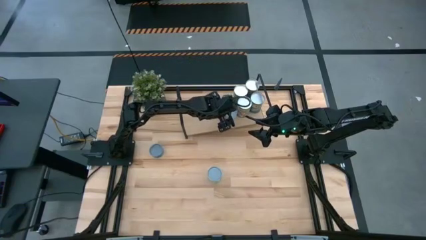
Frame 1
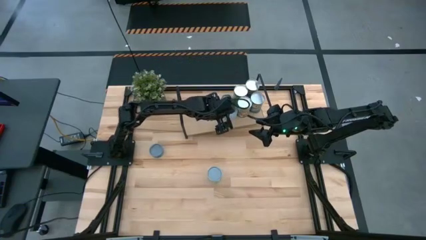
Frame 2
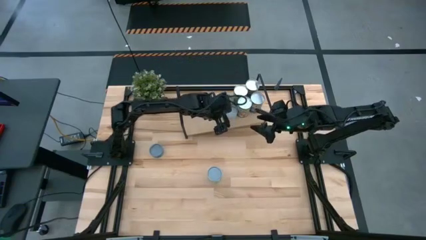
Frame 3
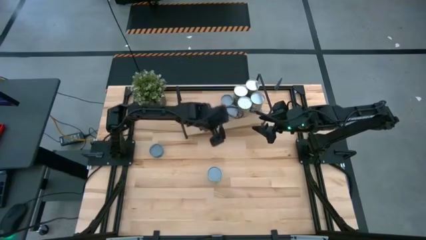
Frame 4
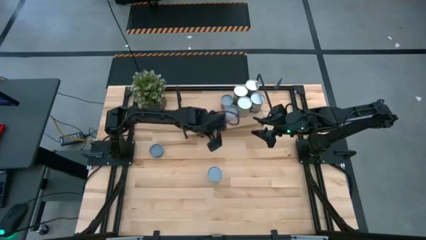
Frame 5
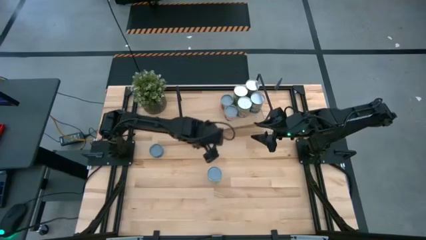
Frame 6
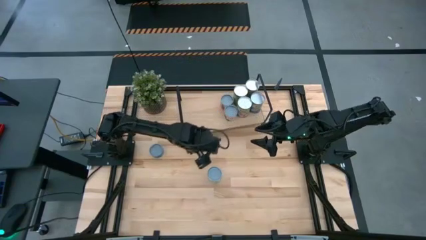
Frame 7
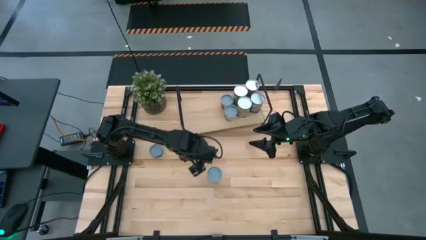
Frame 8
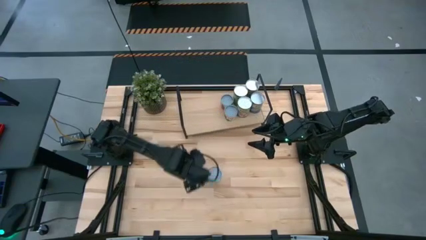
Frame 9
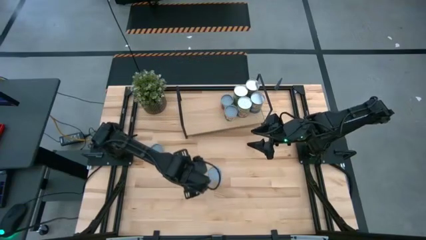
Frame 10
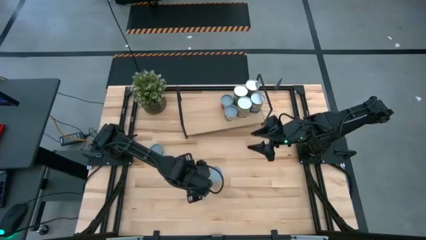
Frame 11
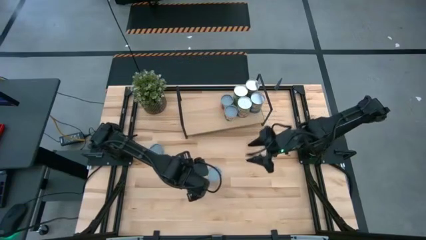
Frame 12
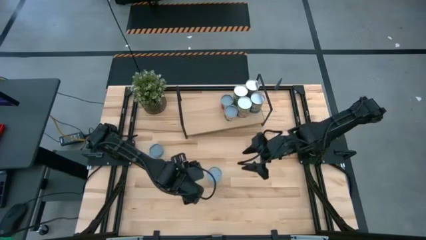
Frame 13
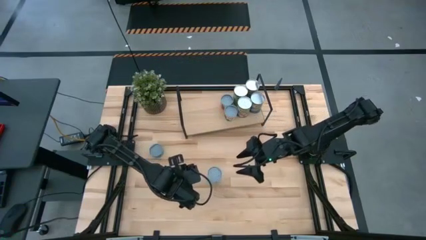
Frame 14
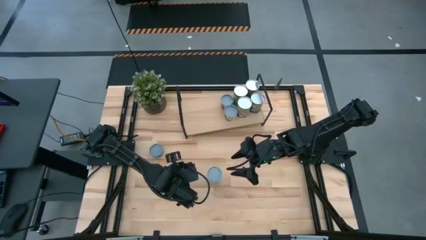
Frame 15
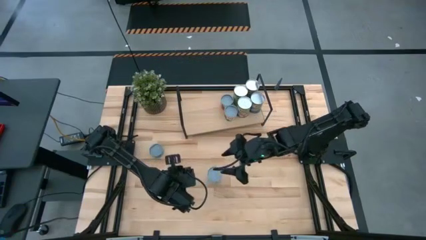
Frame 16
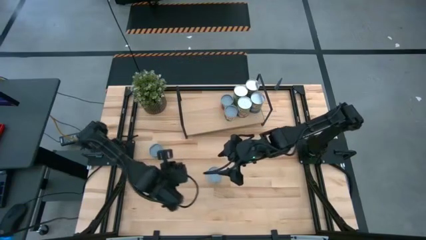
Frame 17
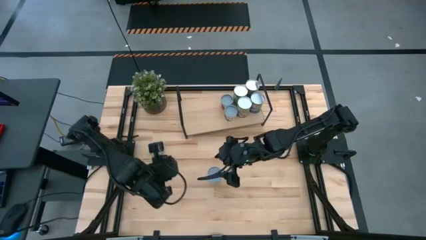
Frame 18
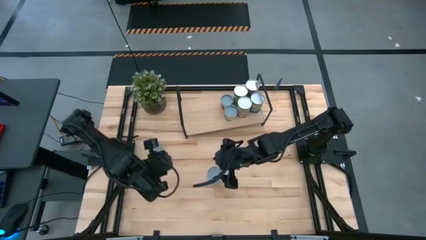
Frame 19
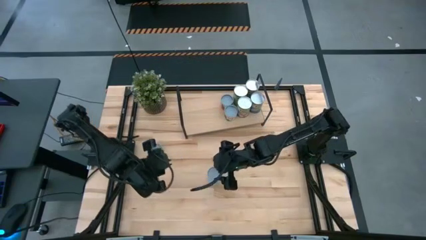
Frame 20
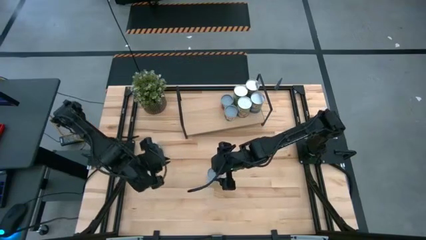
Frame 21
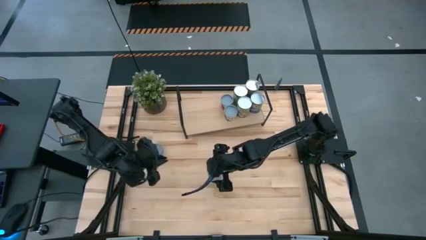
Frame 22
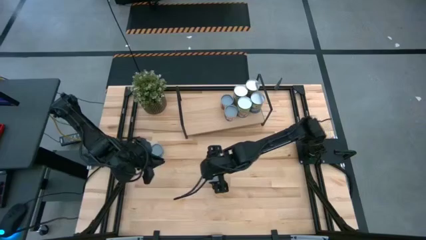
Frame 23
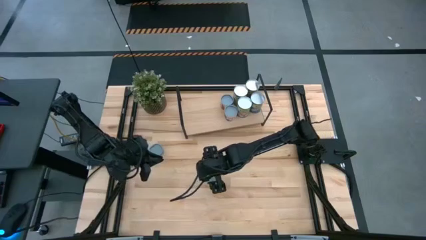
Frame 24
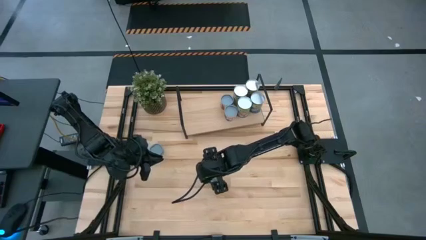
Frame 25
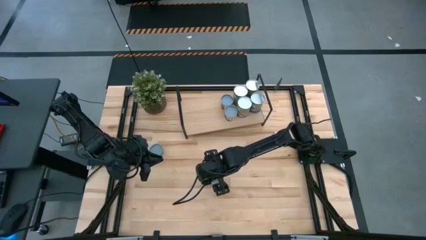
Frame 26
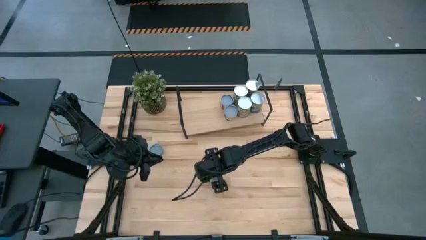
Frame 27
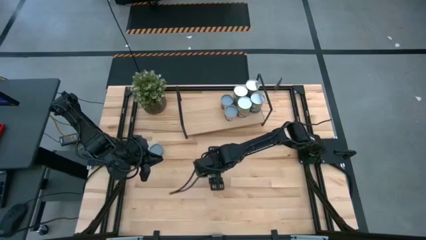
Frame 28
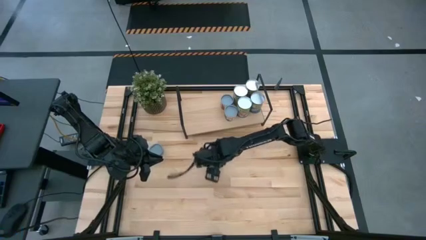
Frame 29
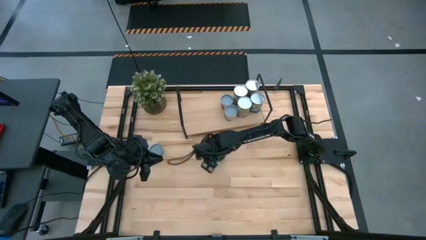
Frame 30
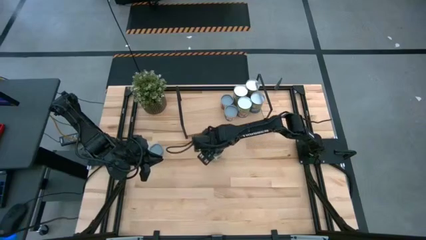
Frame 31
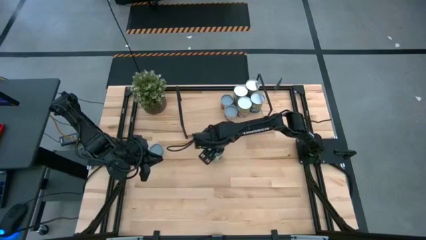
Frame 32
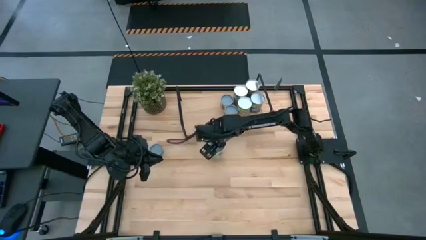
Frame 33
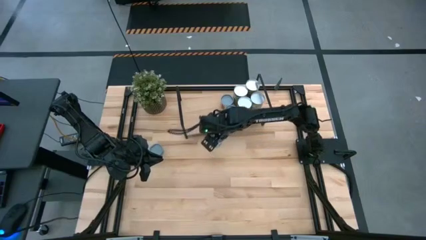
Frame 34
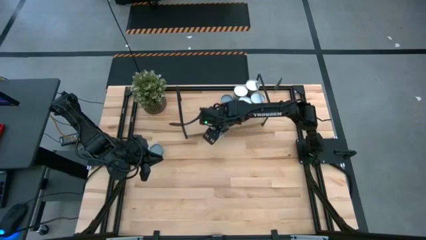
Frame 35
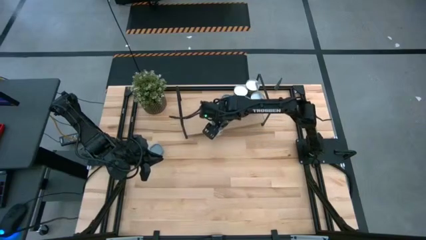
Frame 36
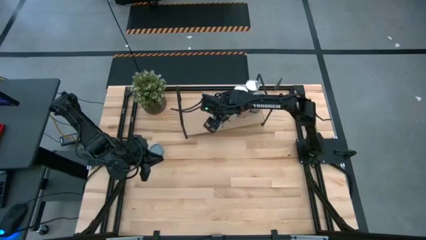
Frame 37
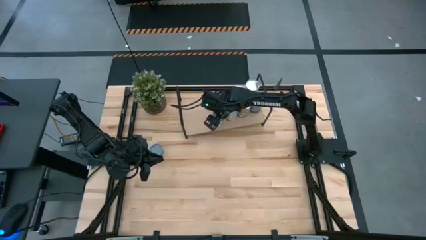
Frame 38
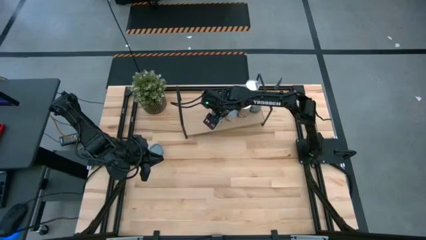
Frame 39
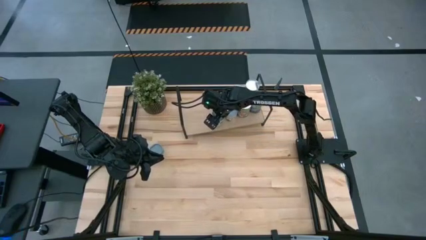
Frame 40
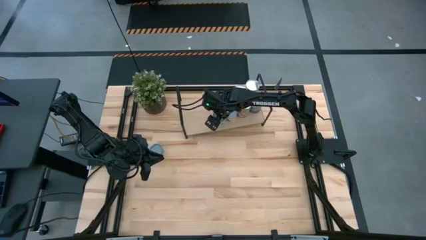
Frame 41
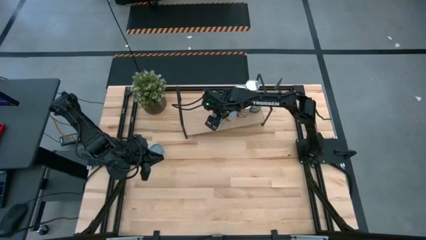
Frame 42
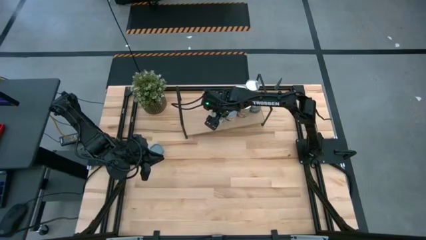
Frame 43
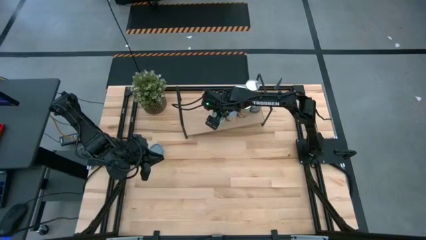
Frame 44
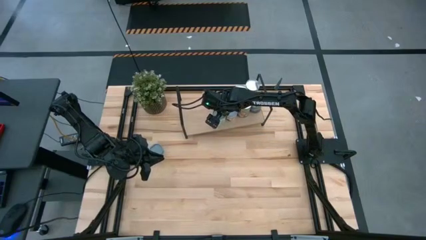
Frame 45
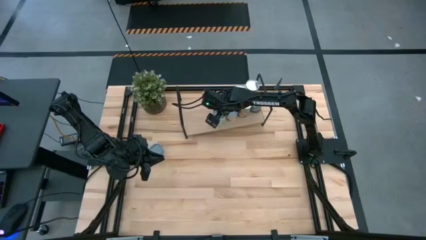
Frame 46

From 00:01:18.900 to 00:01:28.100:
Task: Pick and place cans onto a shelf
Put the canned mixed vegetables on the shelf

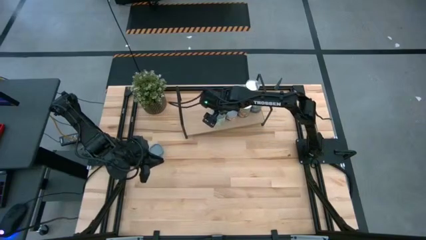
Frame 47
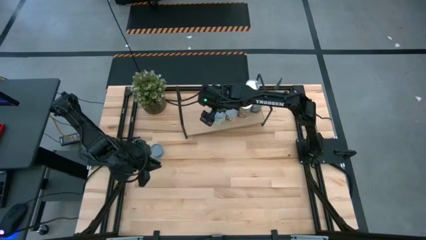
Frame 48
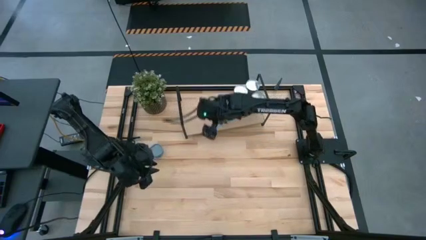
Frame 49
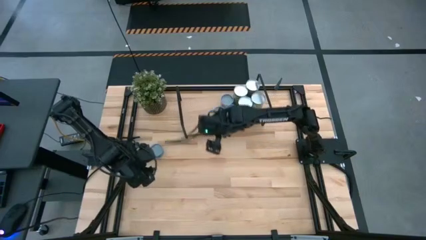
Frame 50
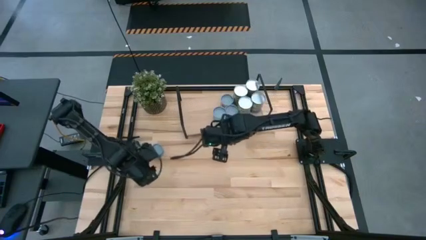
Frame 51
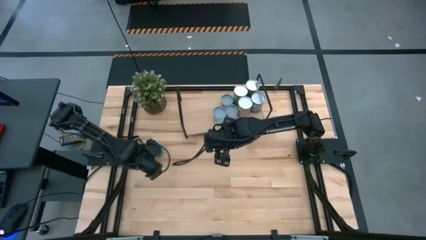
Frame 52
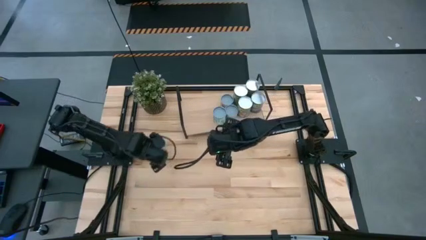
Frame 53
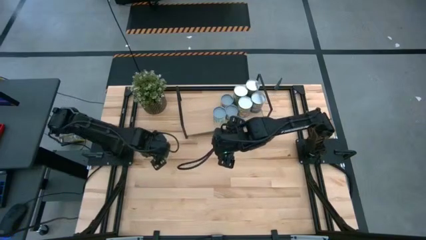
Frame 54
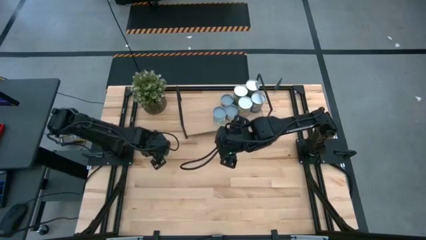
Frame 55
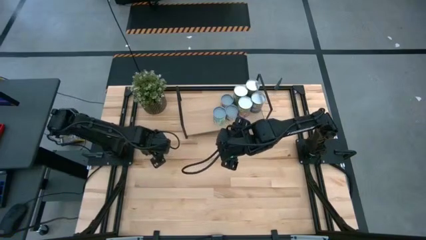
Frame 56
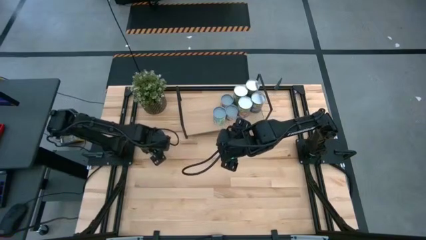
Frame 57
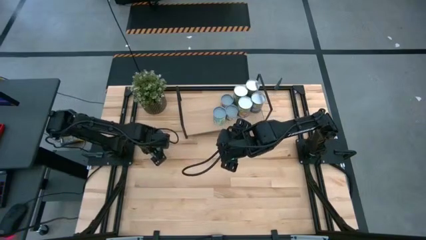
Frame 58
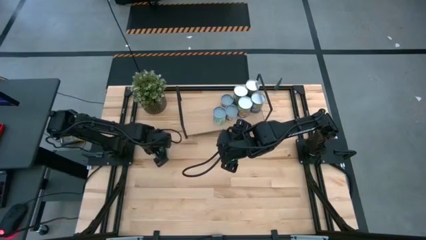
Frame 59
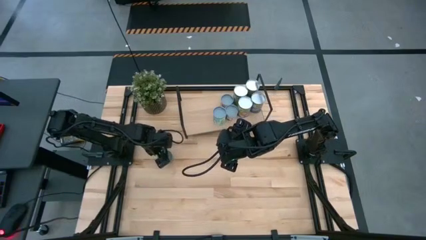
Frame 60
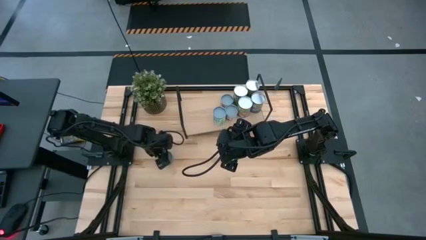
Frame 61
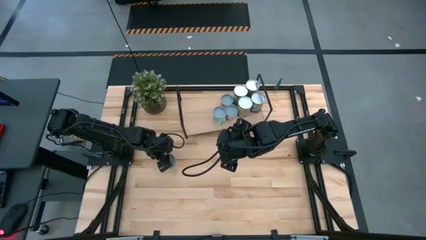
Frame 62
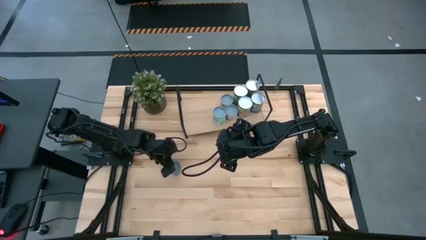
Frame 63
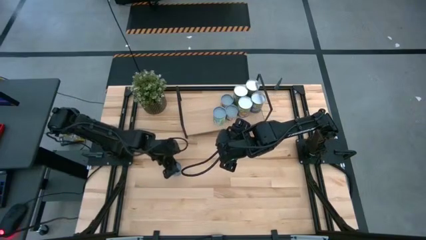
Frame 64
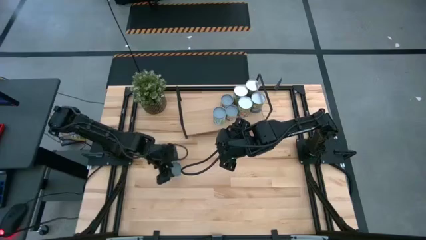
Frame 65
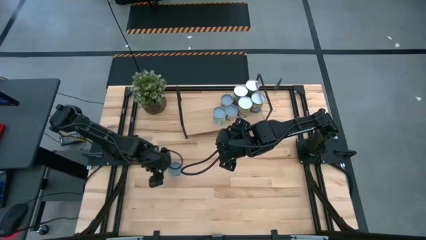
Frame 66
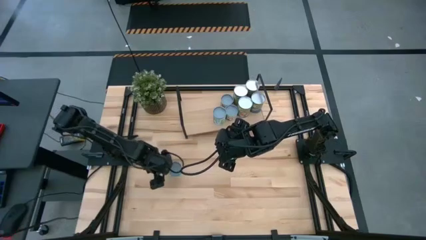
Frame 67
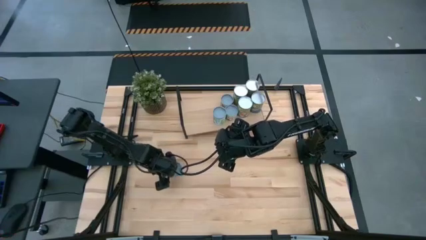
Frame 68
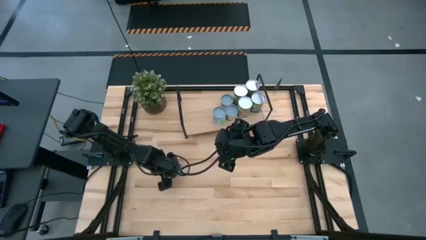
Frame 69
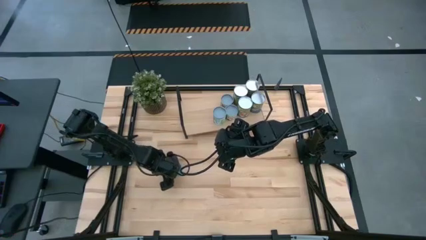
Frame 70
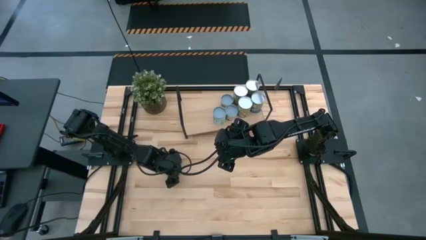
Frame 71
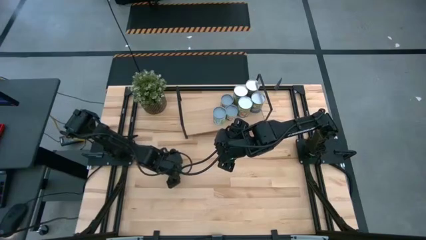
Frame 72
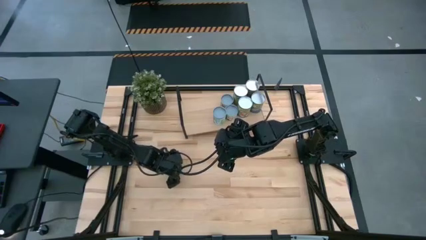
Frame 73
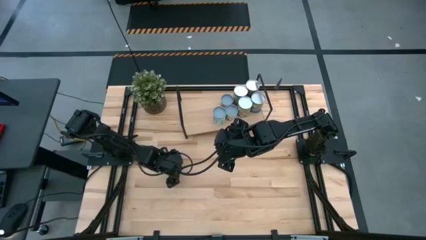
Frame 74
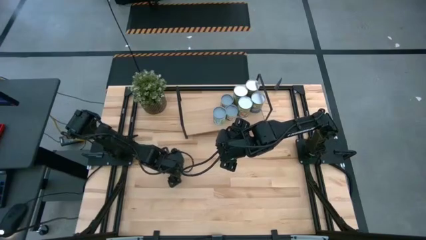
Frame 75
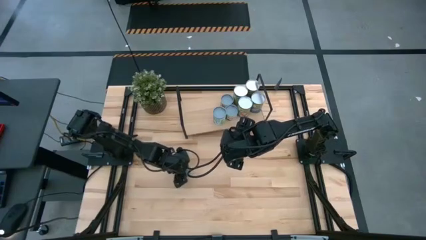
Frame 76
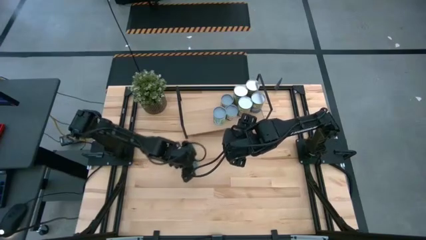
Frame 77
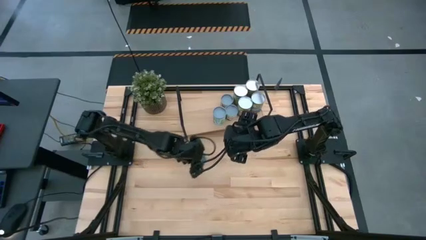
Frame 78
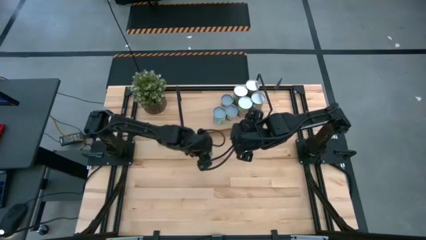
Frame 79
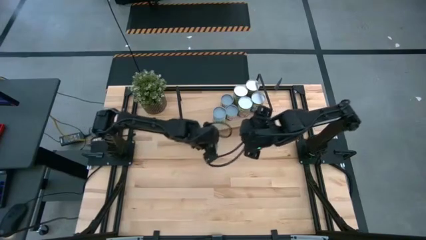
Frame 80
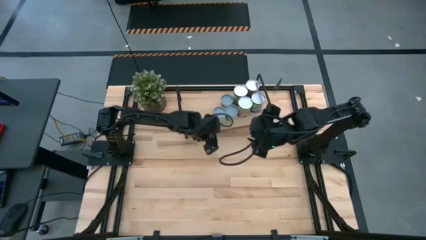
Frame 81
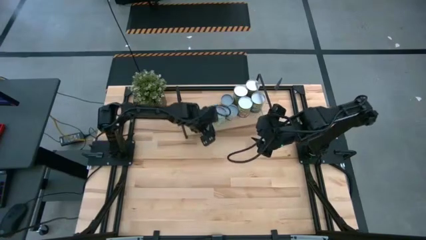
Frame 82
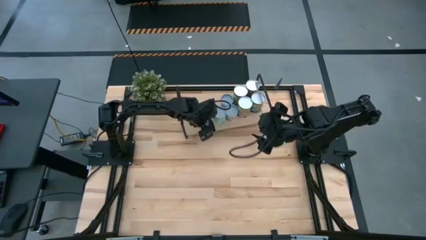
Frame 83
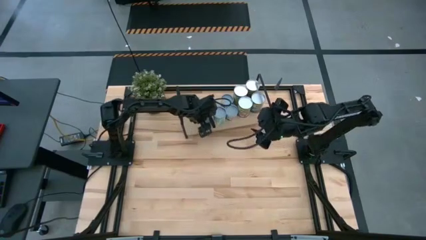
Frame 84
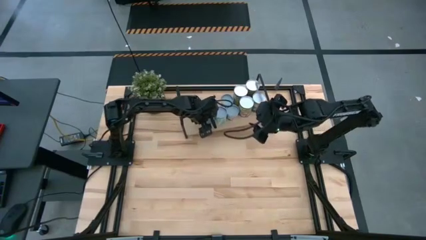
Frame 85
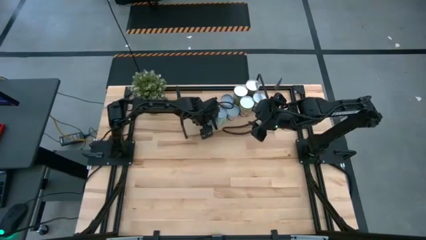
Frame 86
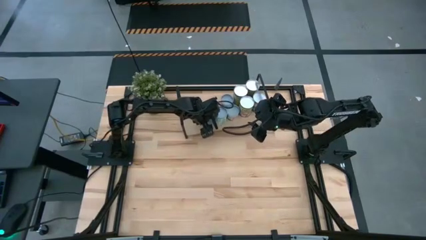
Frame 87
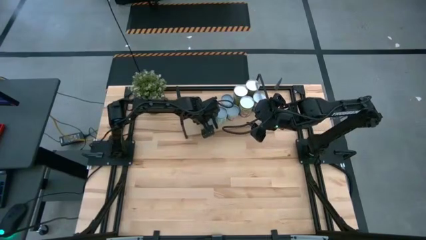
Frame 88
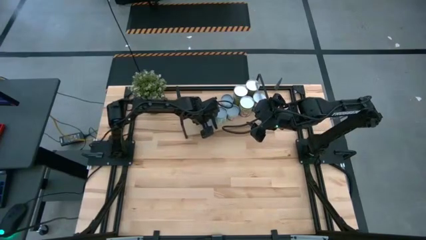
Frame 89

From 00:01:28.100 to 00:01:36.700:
Put the canned tuna on the shelf
